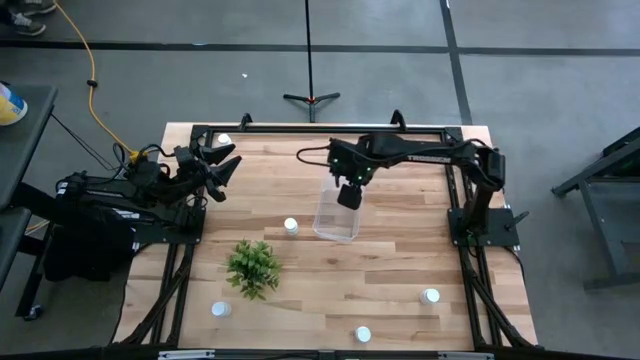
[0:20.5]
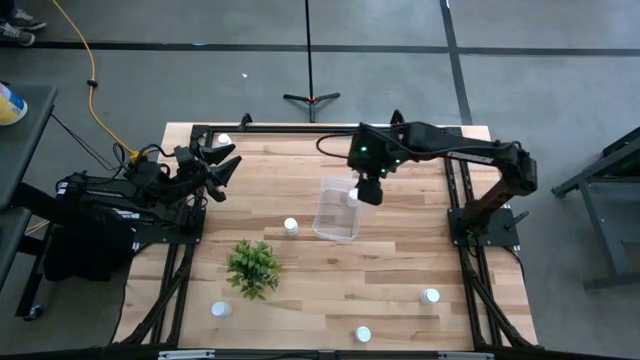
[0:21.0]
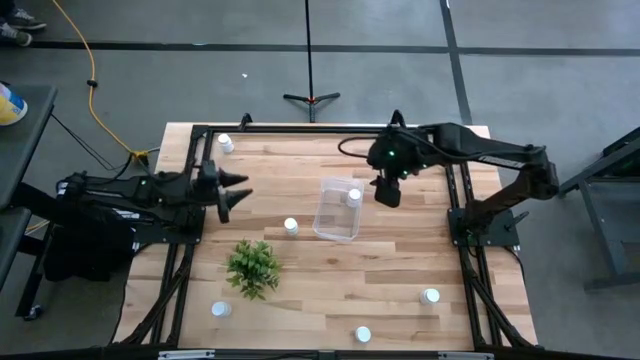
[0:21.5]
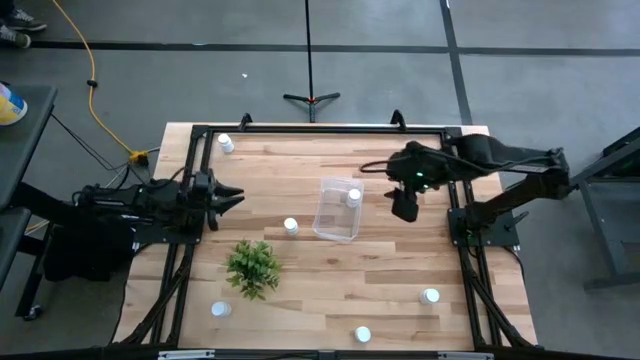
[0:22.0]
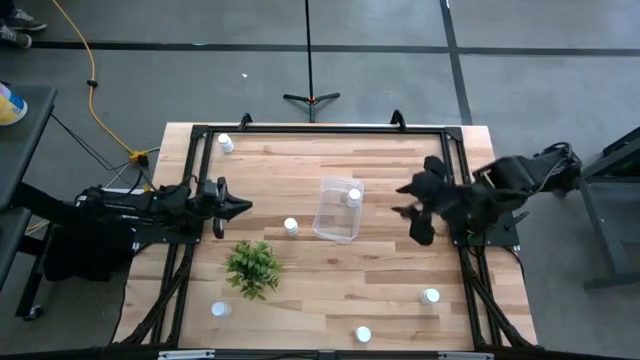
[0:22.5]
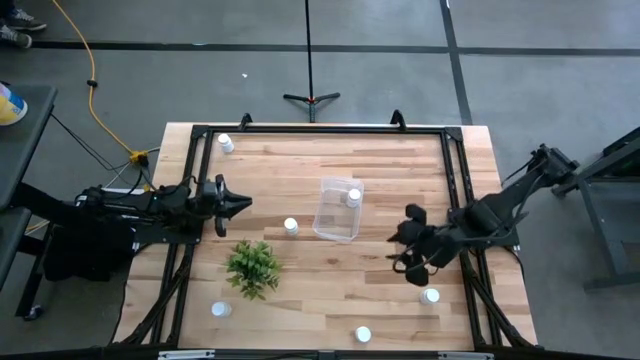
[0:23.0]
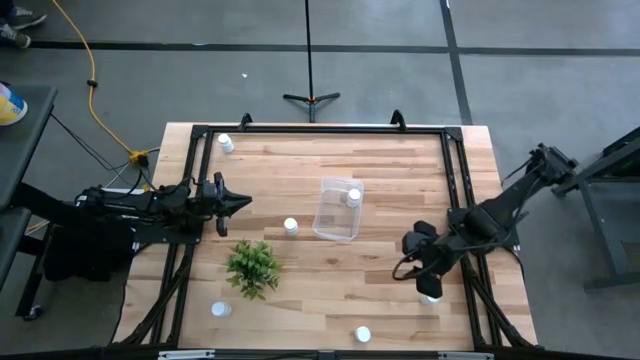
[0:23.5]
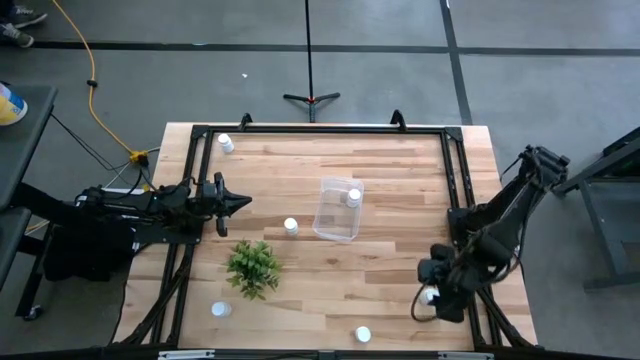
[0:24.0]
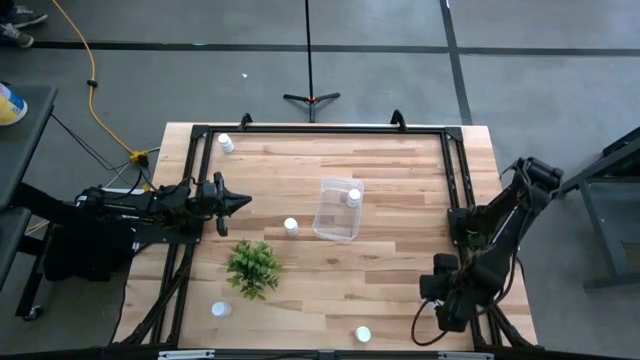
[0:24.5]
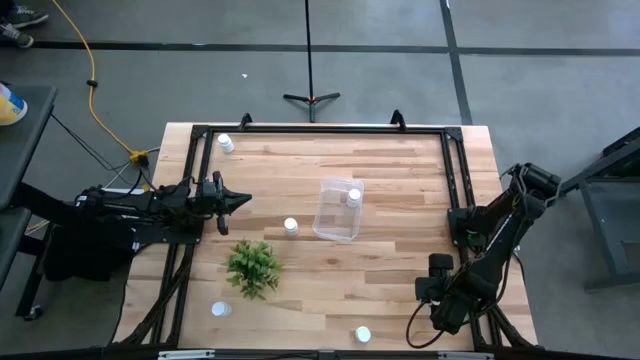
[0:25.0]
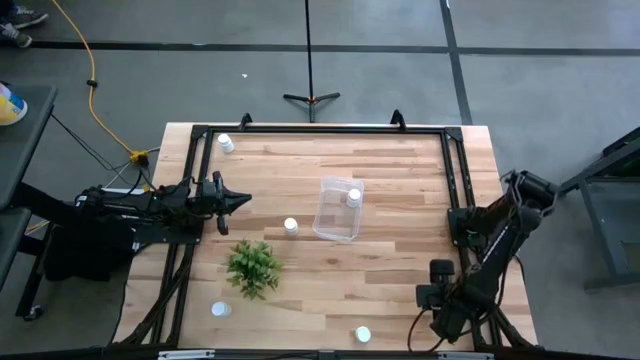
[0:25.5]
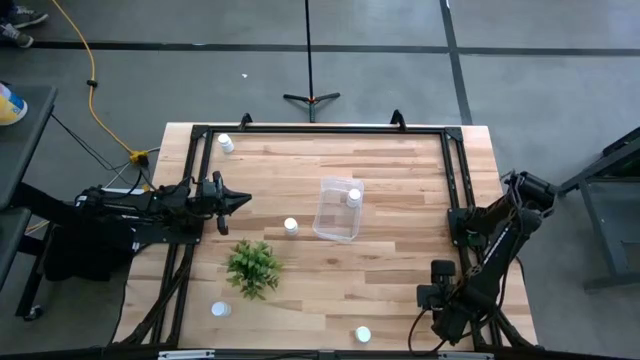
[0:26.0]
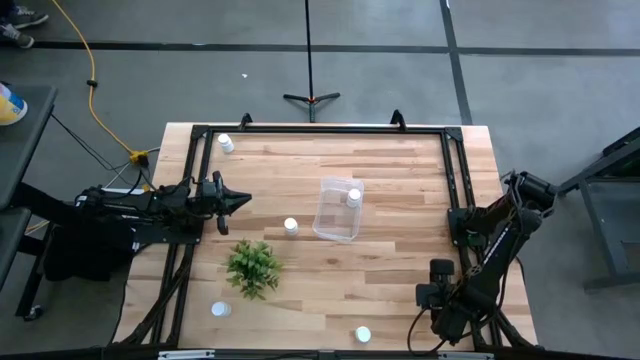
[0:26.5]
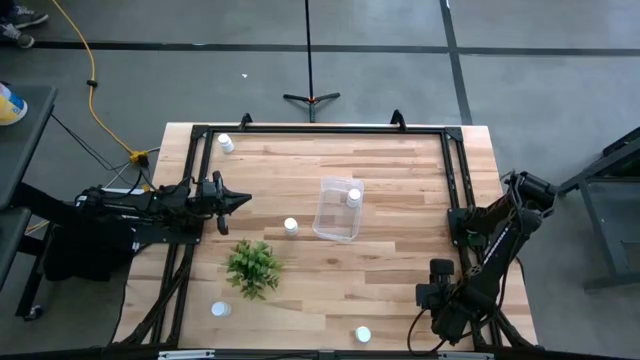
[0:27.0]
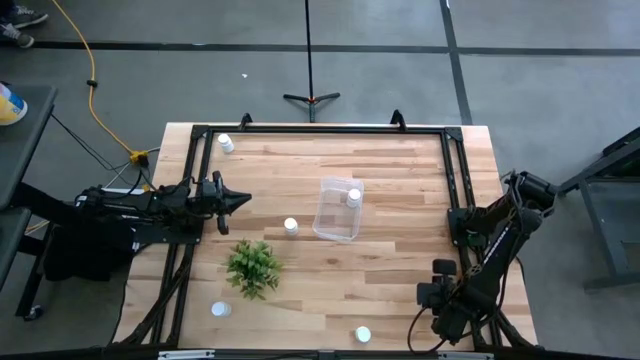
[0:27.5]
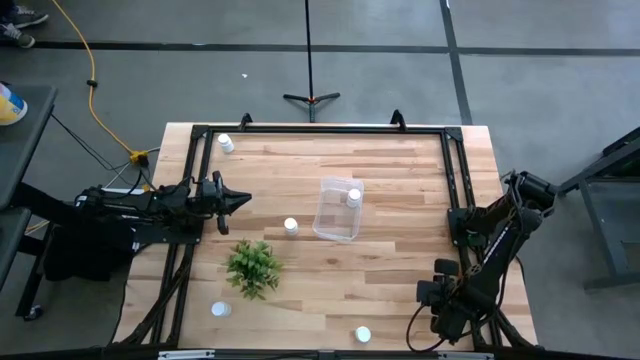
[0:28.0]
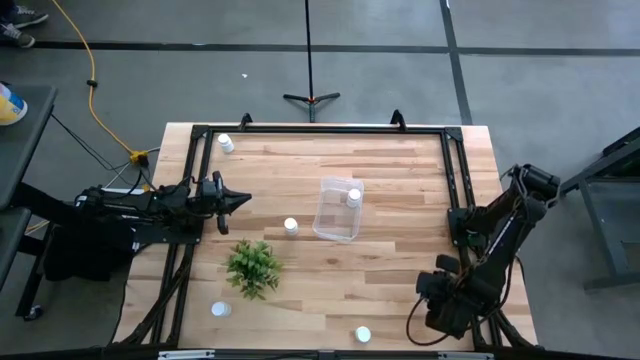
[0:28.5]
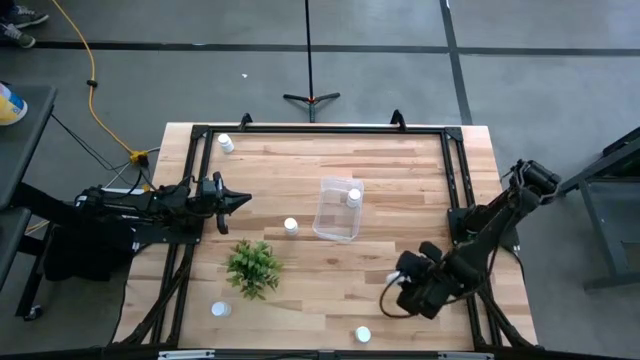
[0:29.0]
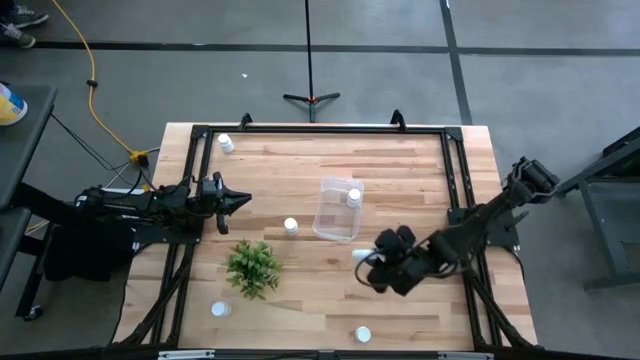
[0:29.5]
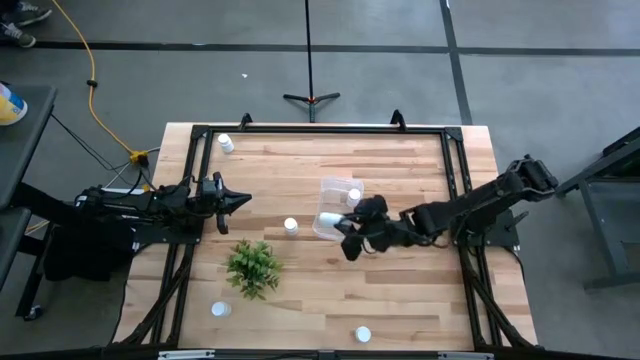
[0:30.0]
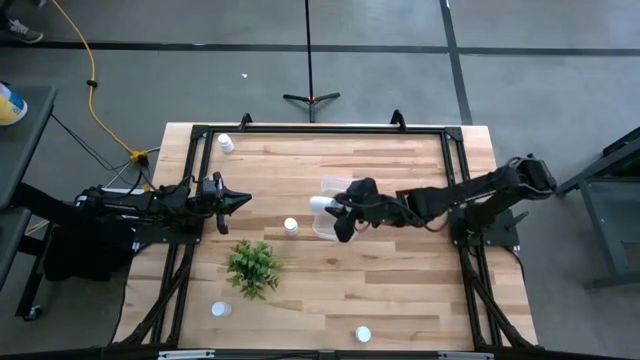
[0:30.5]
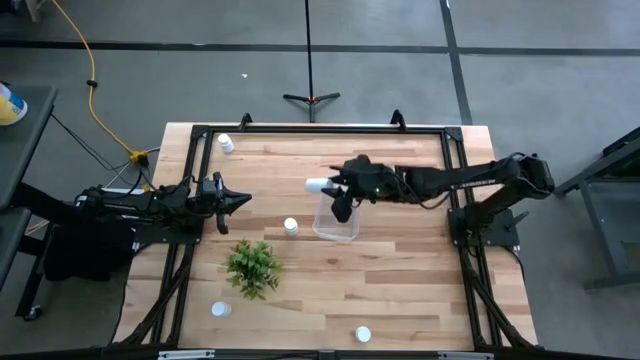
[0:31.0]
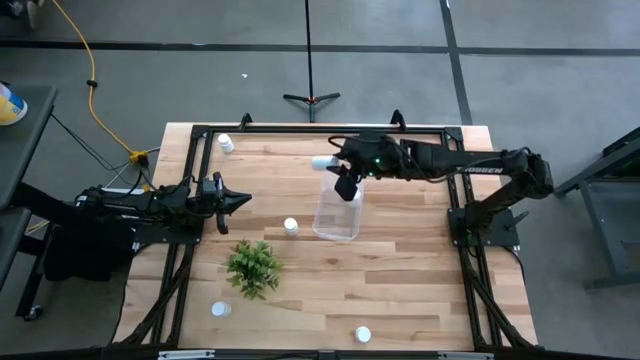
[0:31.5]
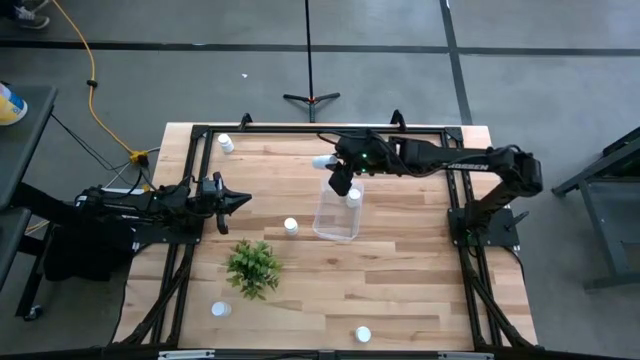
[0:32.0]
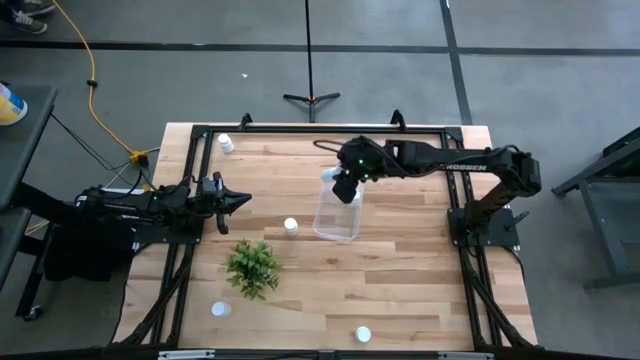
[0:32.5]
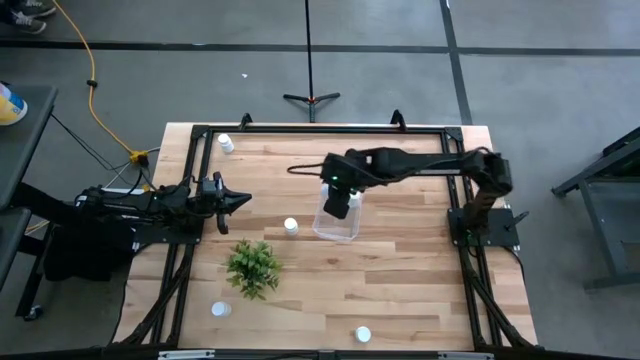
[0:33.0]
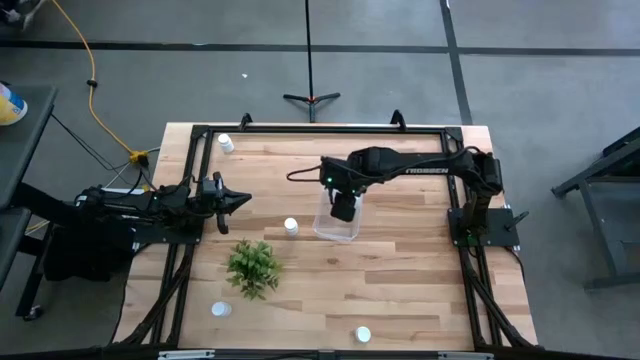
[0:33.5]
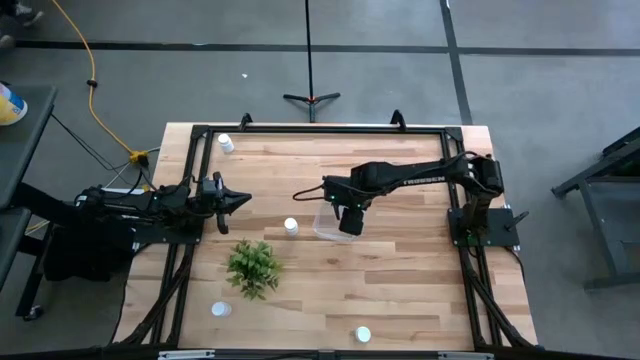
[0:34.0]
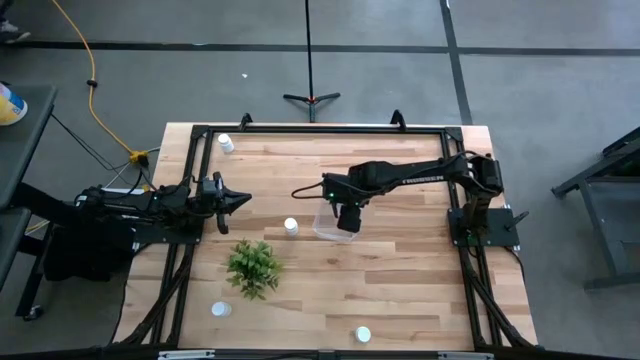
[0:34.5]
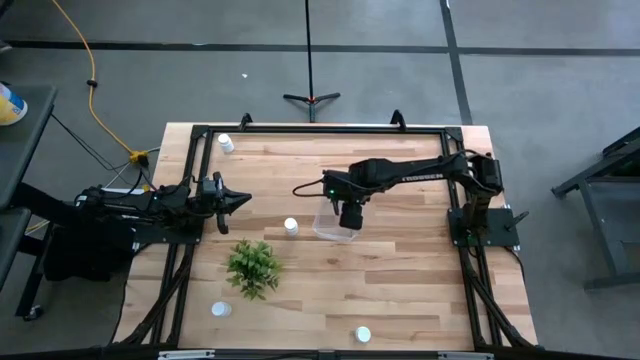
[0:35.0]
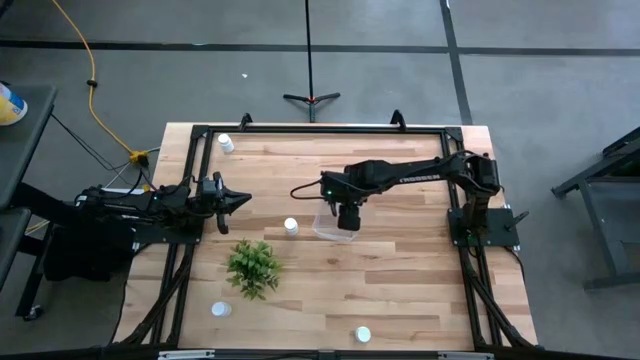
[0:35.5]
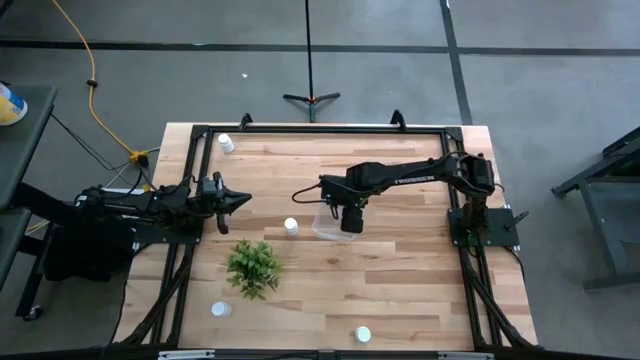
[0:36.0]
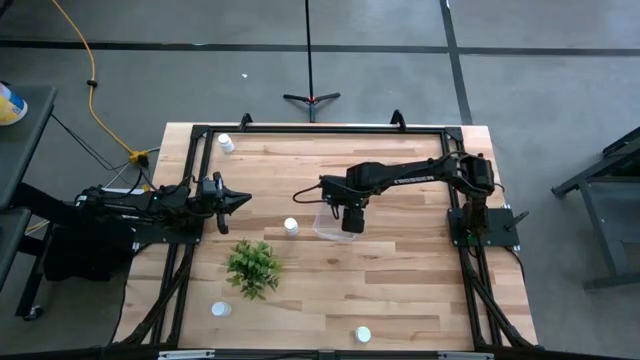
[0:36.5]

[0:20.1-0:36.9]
Task: Pick and place pill bottles into a basket
Put the white medicine bottle into the transparent bin

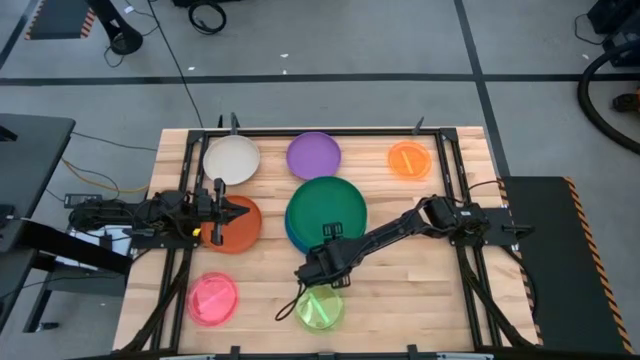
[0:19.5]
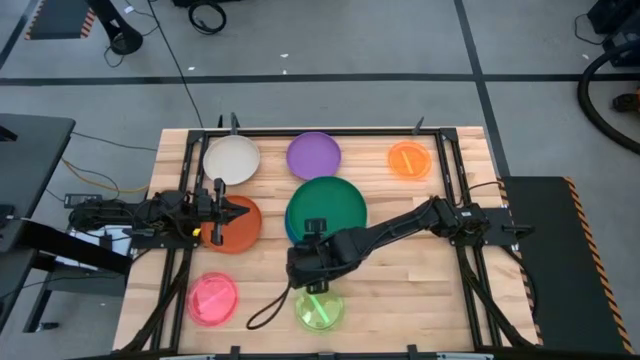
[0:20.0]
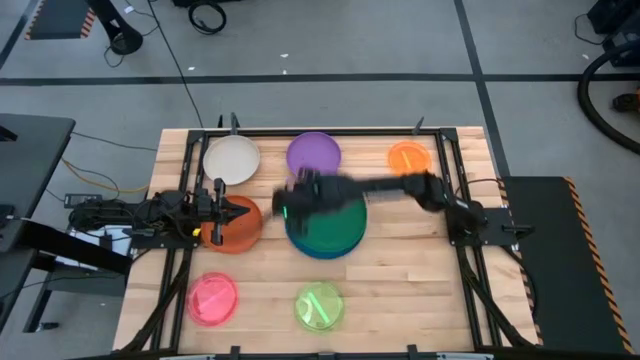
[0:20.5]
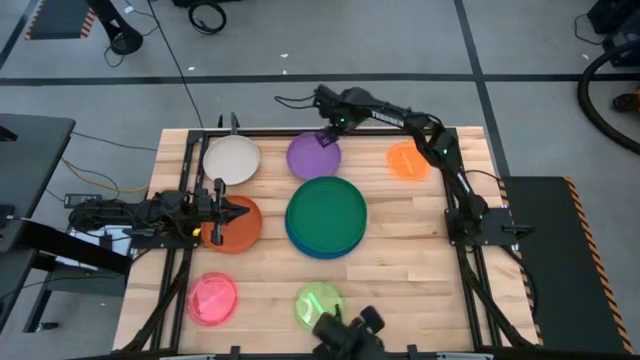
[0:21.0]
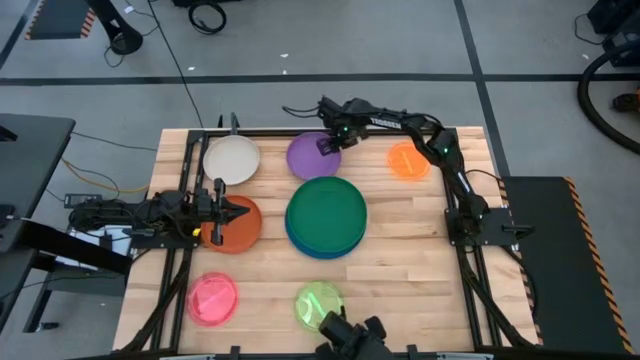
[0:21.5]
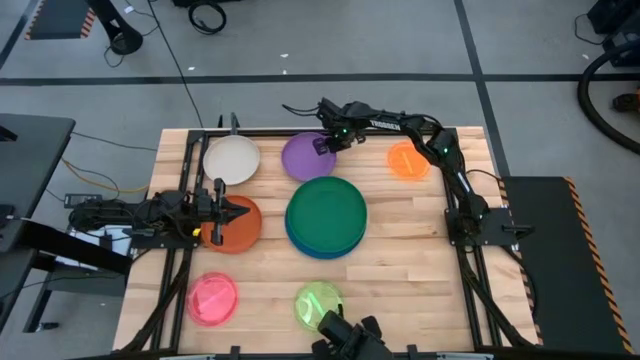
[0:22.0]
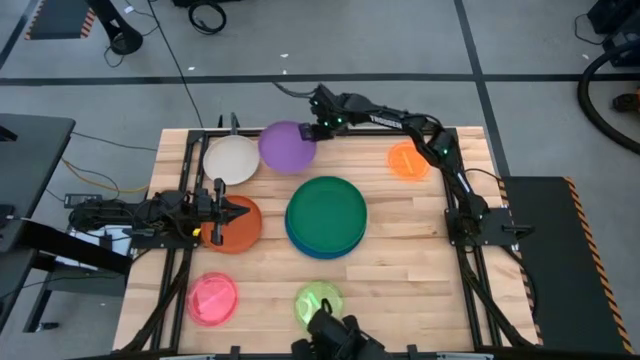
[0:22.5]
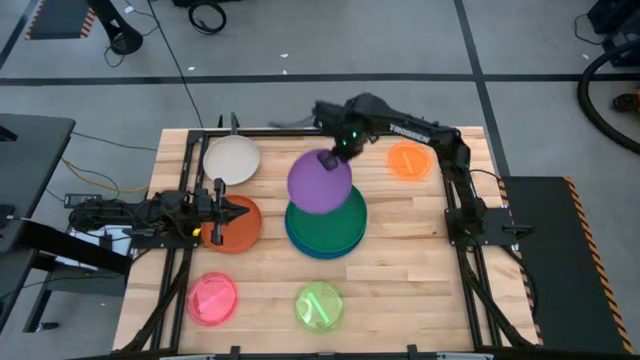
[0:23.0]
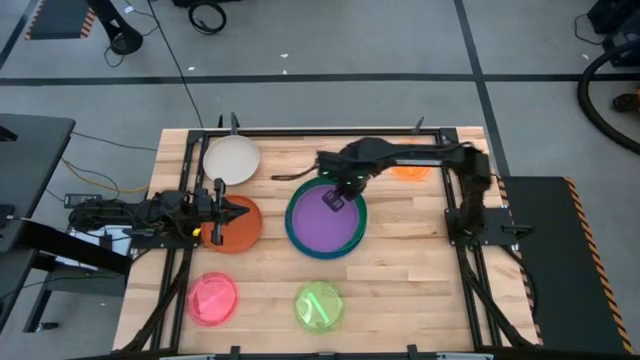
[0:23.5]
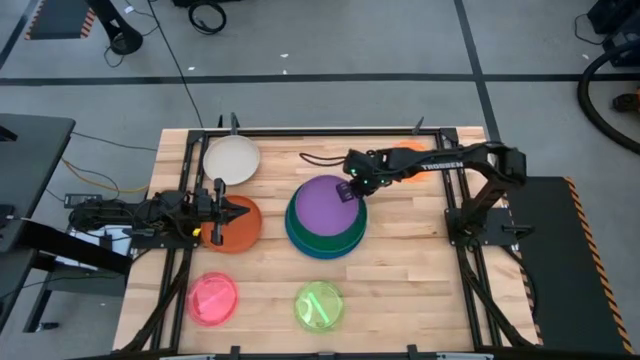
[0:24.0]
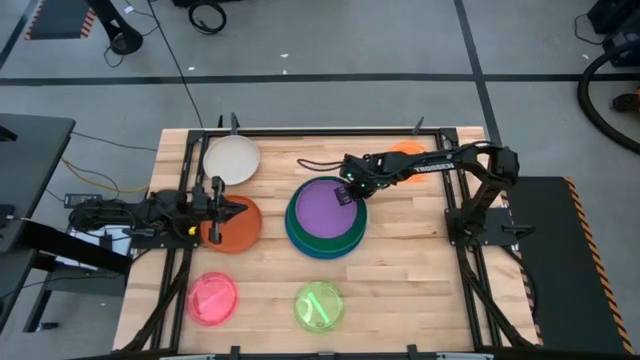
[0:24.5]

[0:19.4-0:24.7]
Task: Stack plastic plates
Stack the purple plate on top of the green plate
